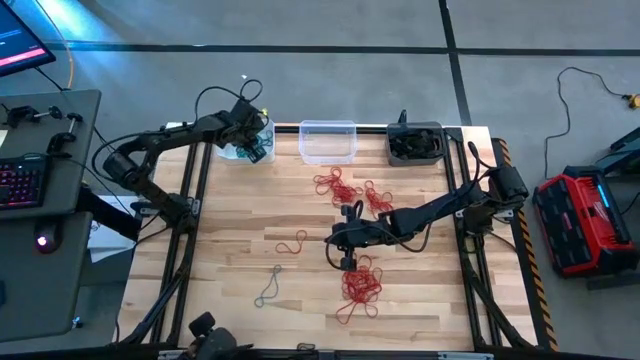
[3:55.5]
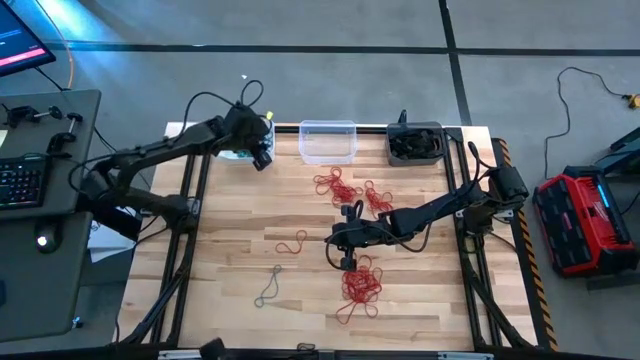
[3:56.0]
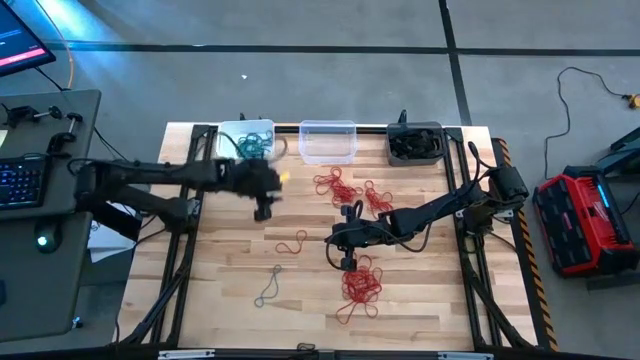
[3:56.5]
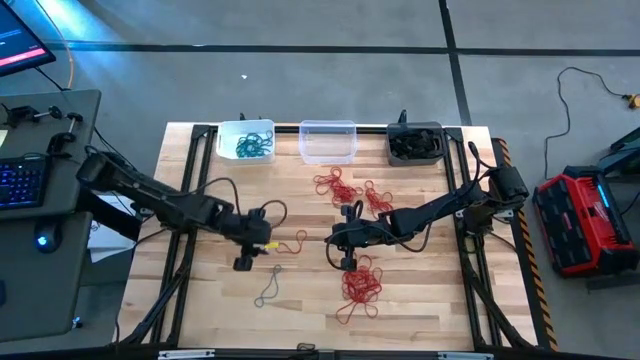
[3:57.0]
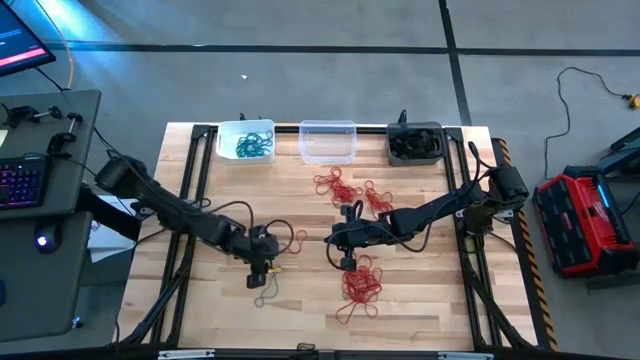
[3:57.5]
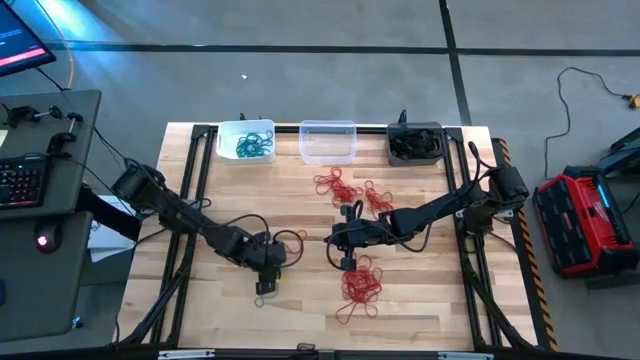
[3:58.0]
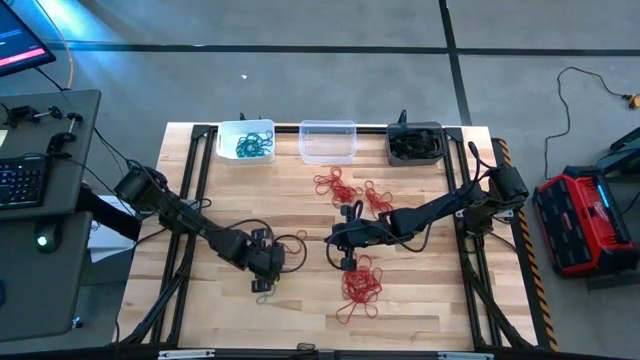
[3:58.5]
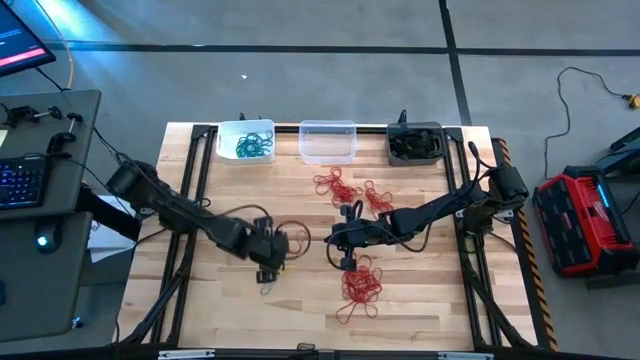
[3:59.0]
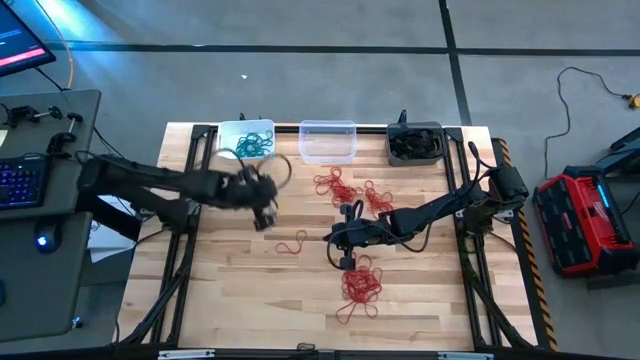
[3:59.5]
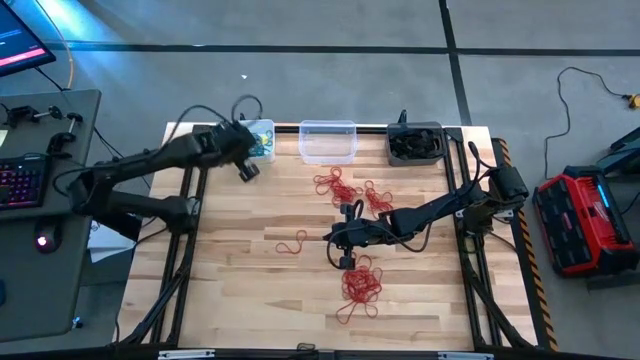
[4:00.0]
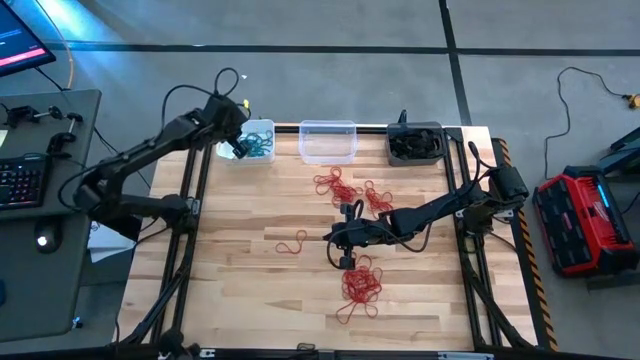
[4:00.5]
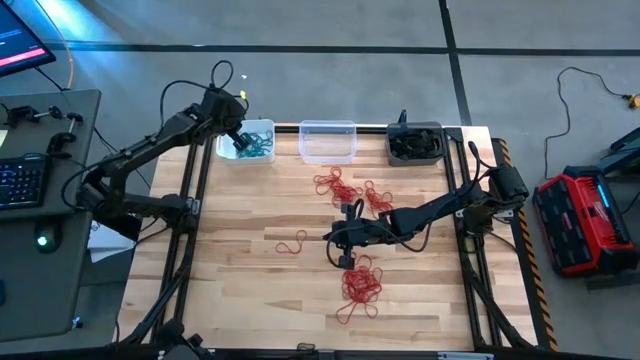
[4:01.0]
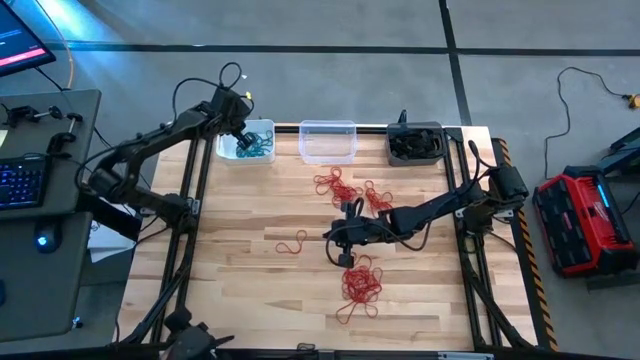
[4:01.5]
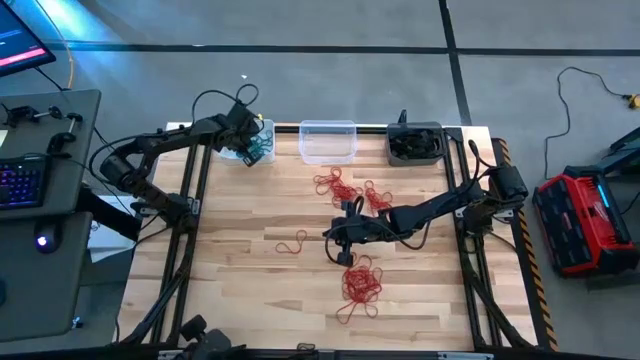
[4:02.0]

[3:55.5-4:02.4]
Task: Sort rubber bands into baskets
Put the blue rubber band into the white bin

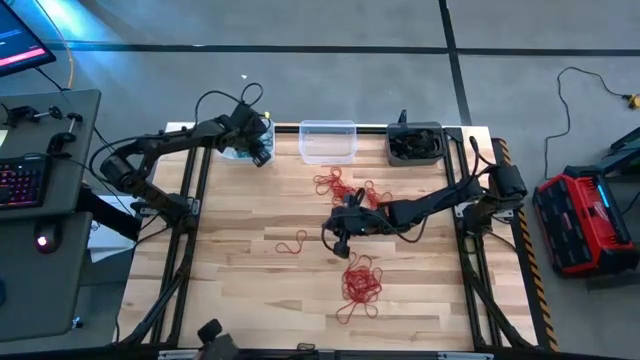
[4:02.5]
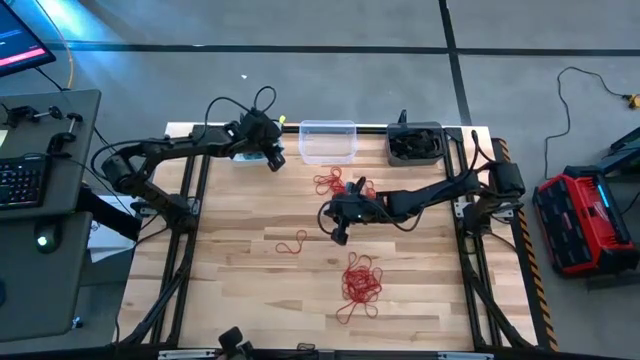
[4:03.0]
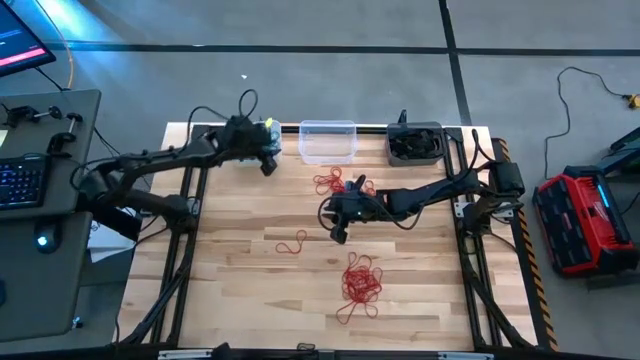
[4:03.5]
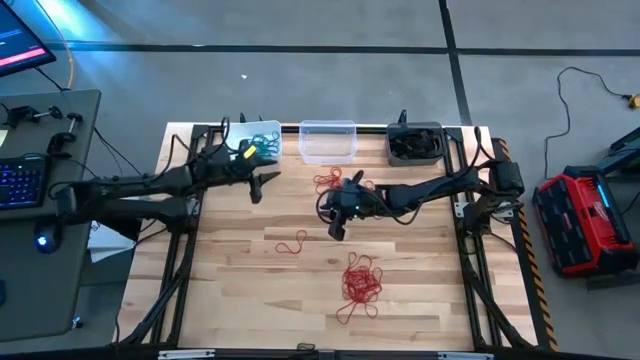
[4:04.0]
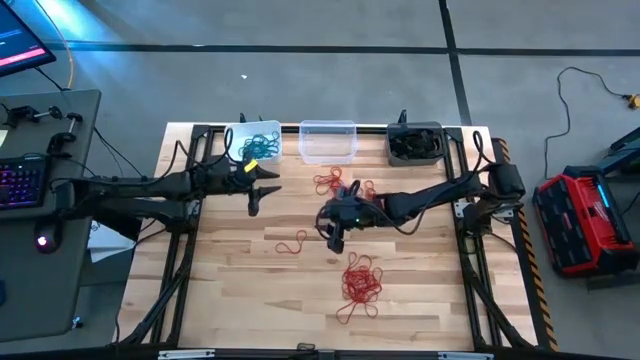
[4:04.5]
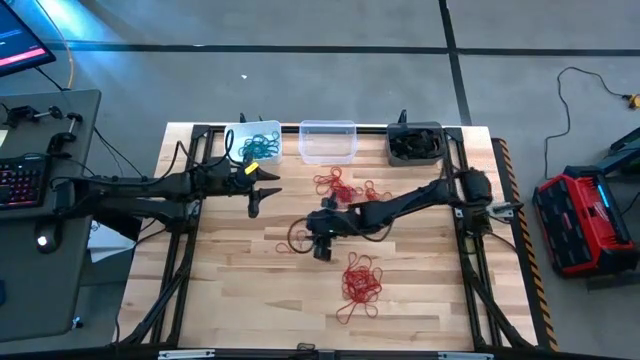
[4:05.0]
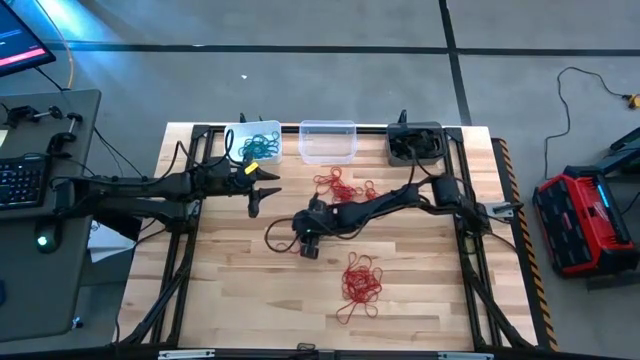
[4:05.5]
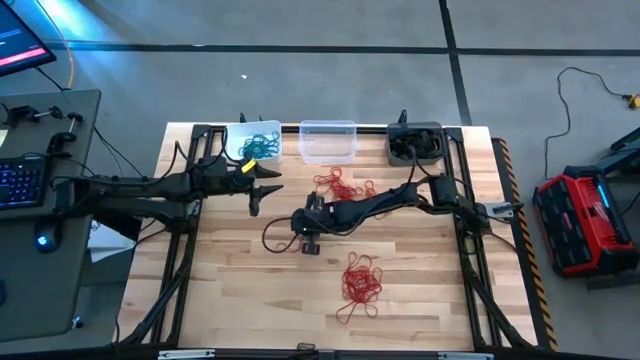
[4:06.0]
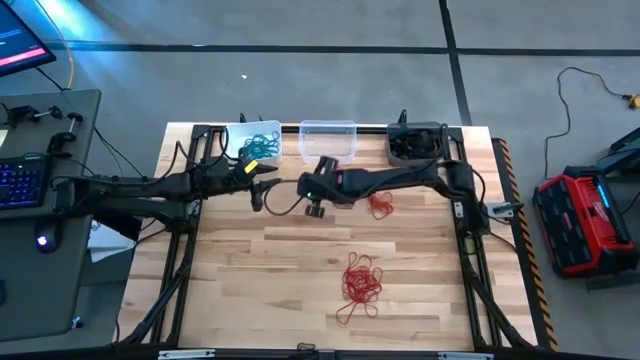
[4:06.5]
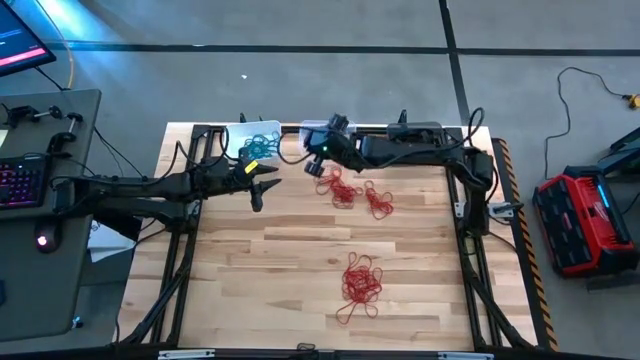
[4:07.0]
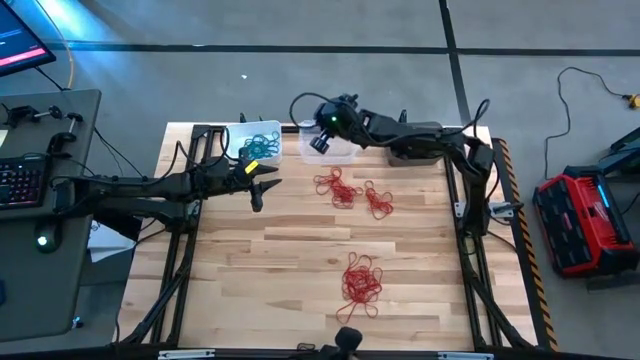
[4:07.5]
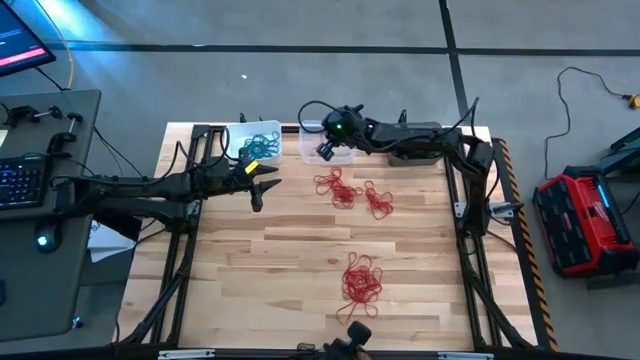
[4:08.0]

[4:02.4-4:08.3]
Put the red rubber band into the transparent bin

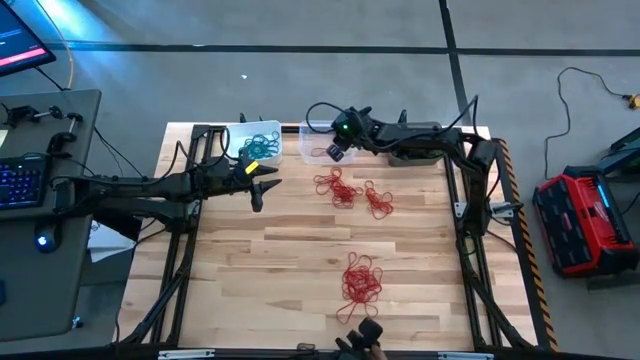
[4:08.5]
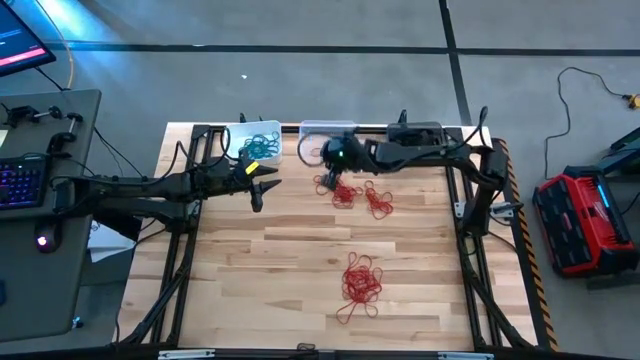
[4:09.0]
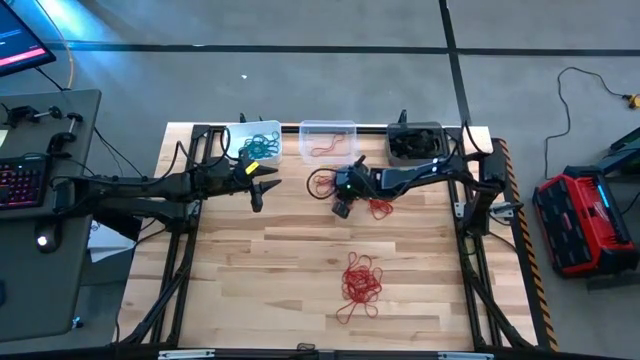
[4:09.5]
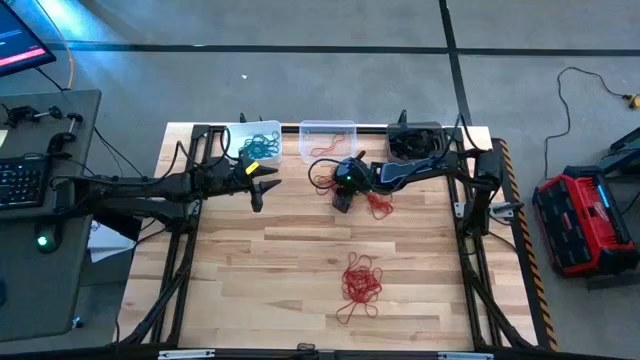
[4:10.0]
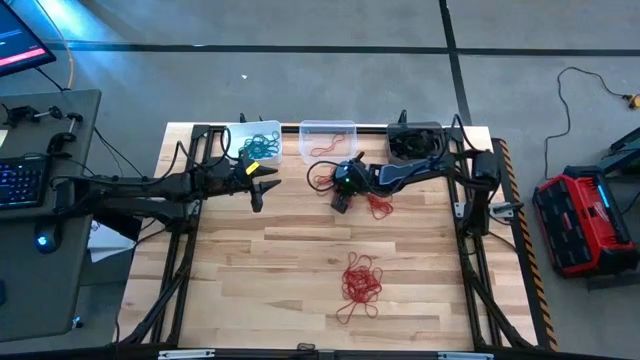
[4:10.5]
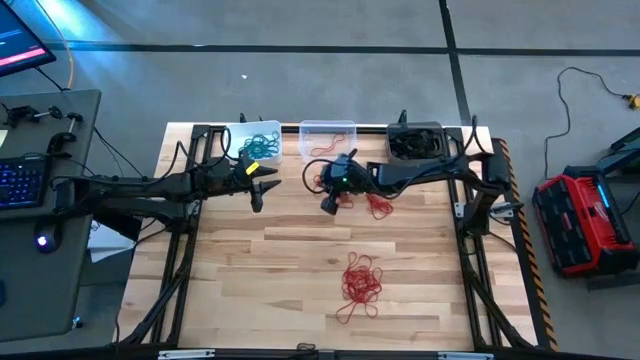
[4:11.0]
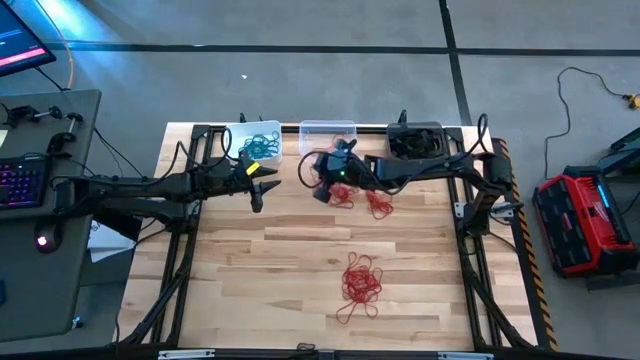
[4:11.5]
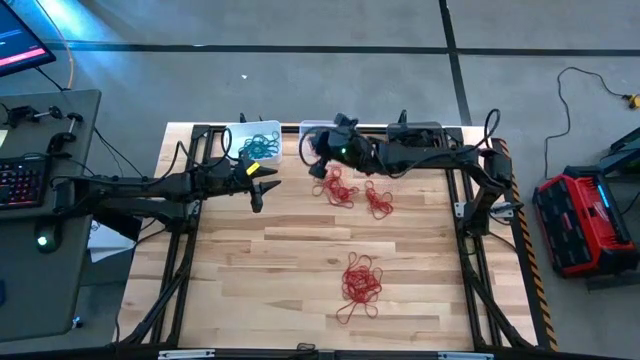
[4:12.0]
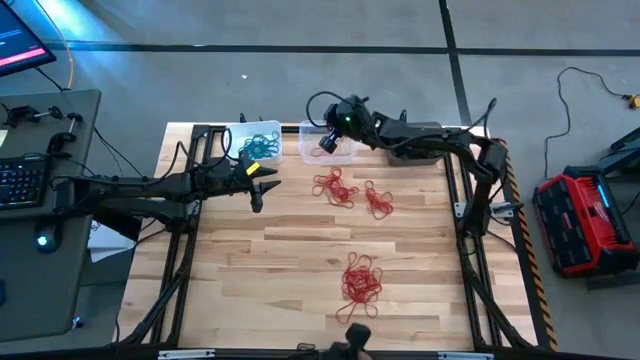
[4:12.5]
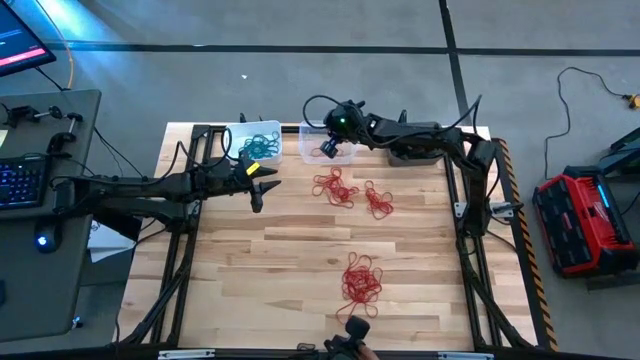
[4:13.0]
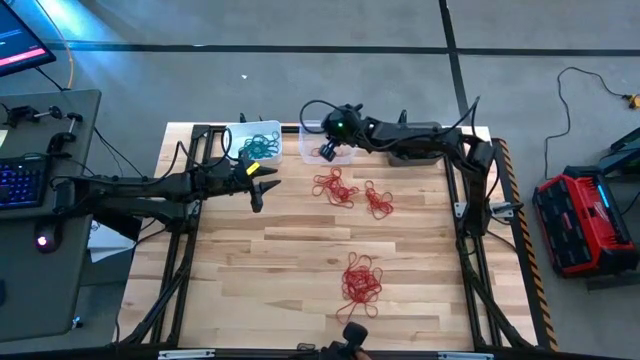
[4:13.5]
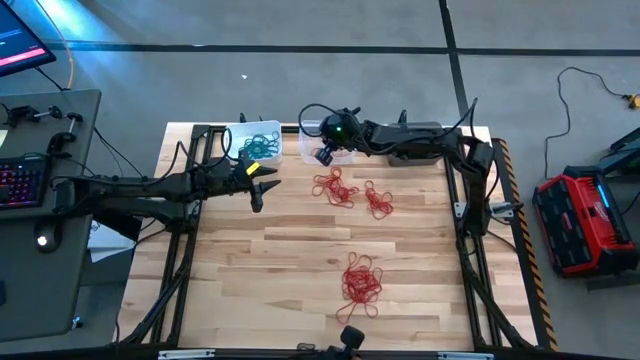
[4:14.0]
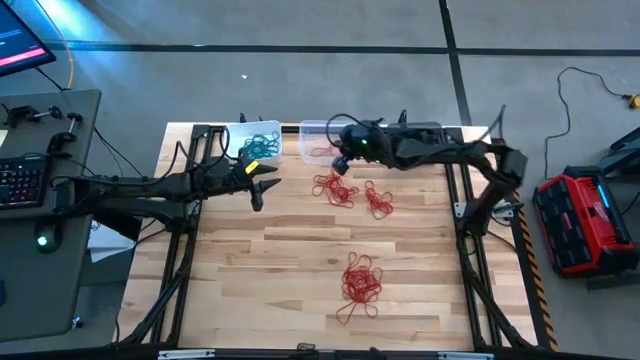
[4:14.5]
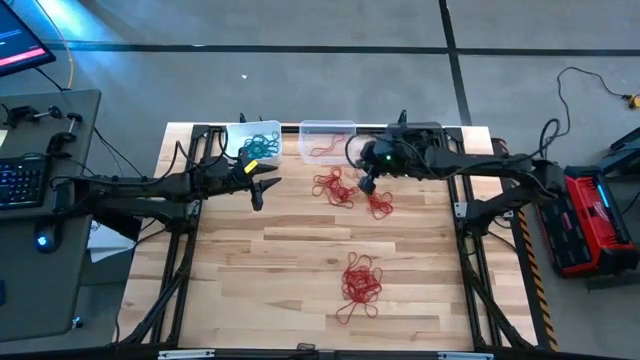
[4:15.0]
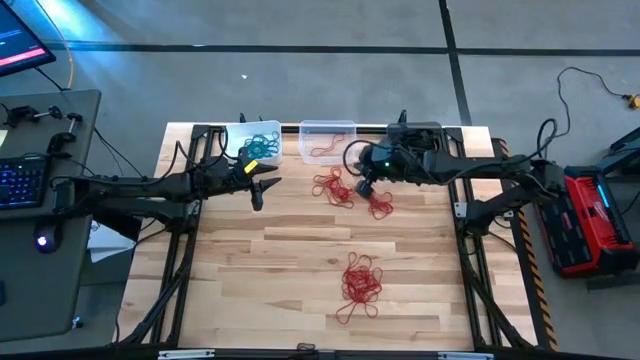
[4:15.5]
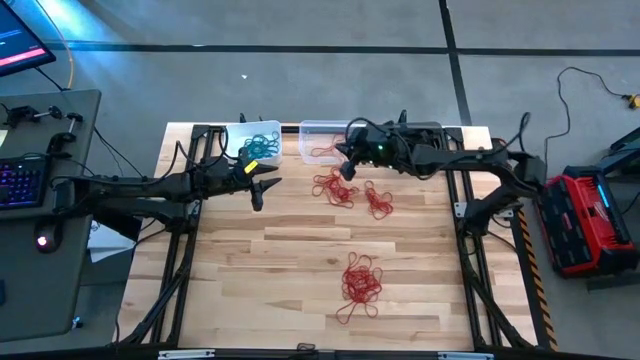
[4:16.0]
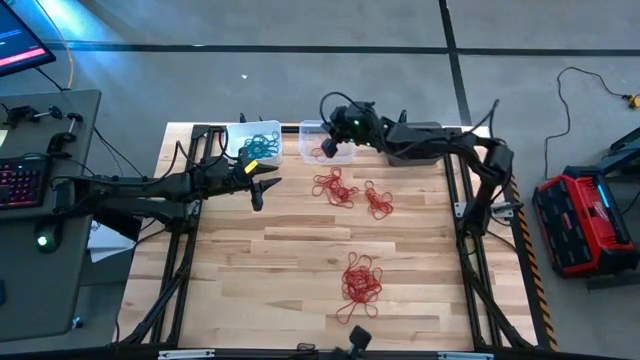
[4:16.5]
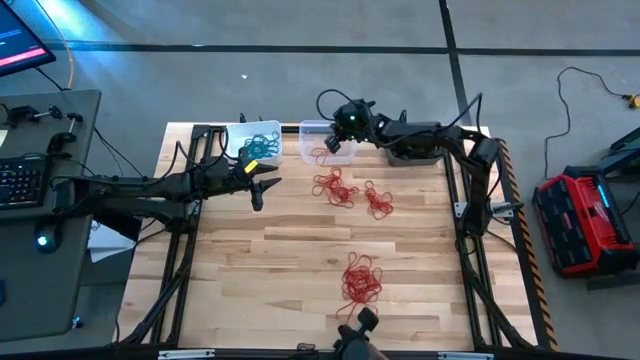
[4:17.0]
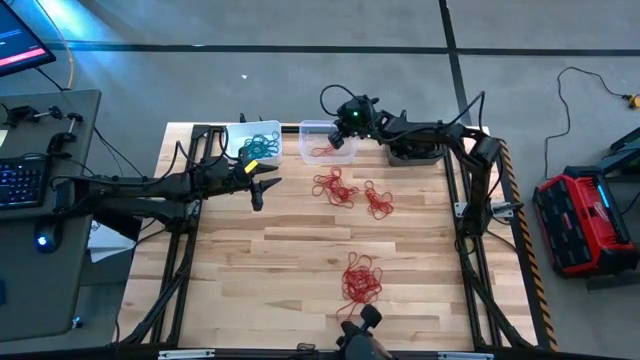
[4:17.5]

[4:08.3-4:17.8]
Put the red rubber band into the transparent bin
